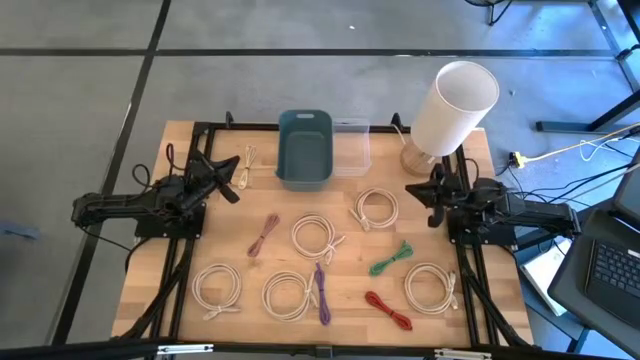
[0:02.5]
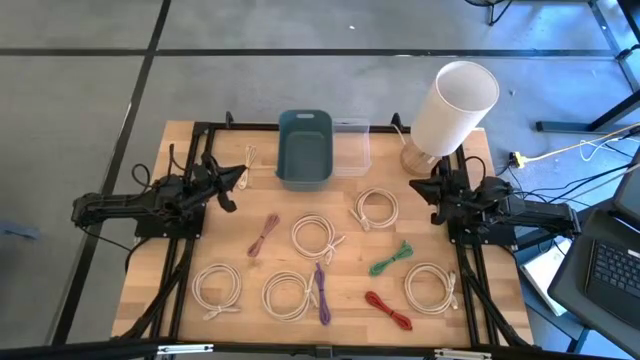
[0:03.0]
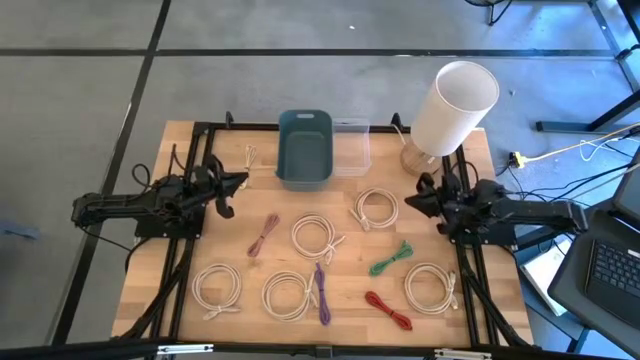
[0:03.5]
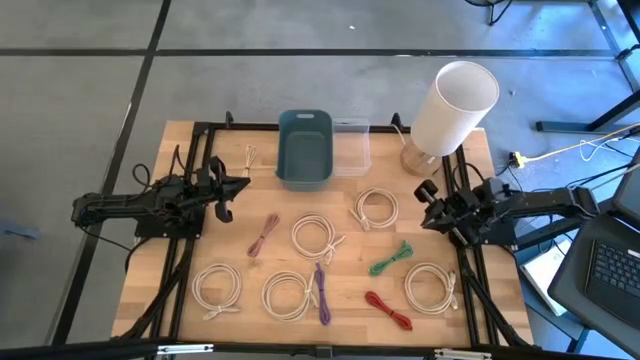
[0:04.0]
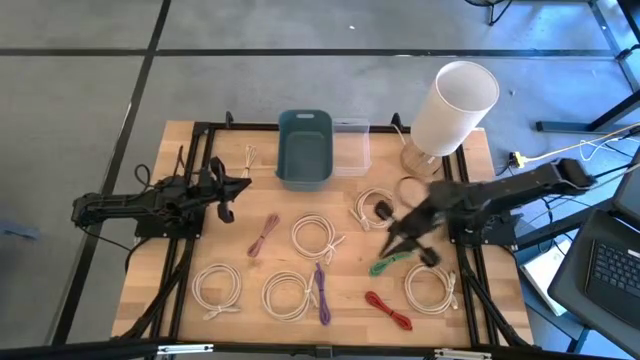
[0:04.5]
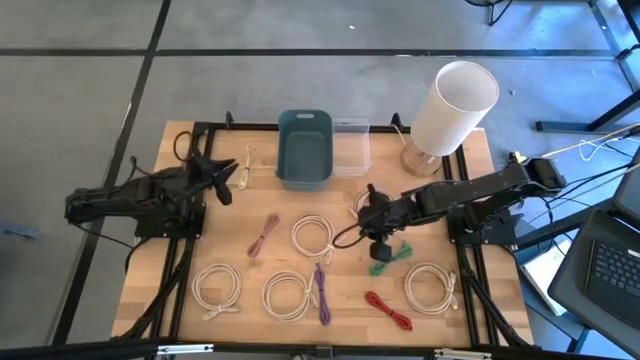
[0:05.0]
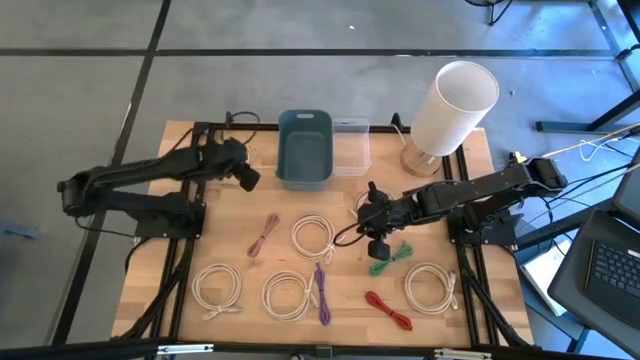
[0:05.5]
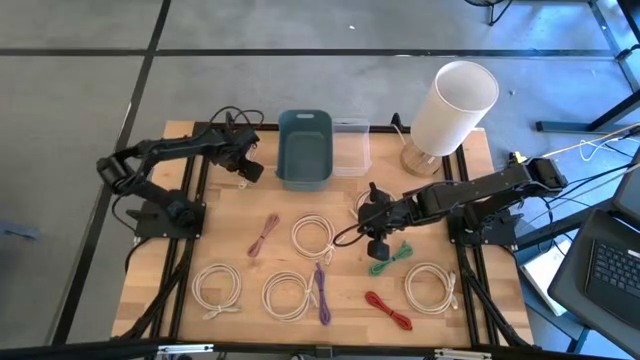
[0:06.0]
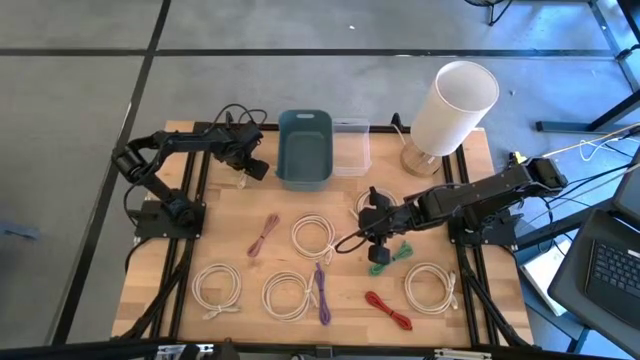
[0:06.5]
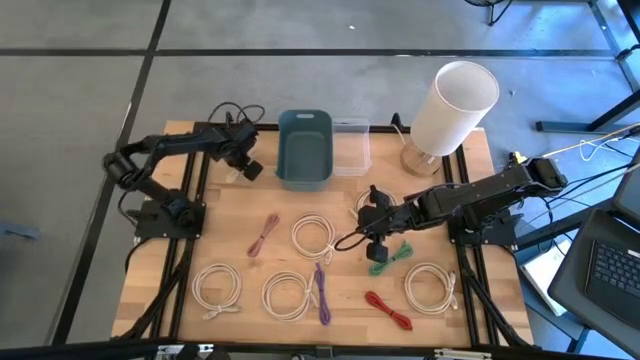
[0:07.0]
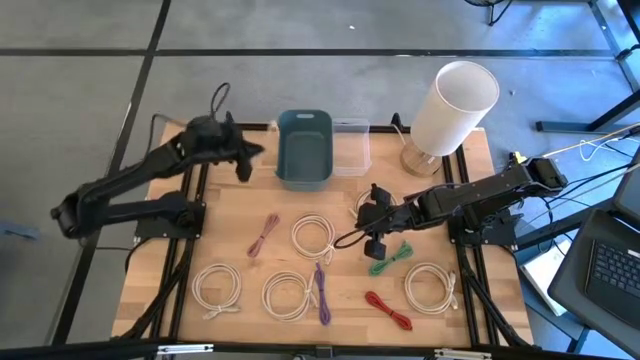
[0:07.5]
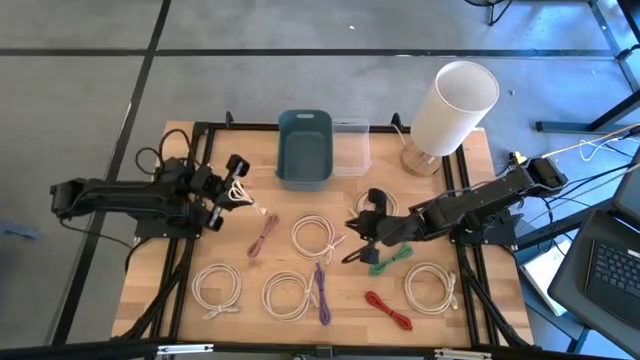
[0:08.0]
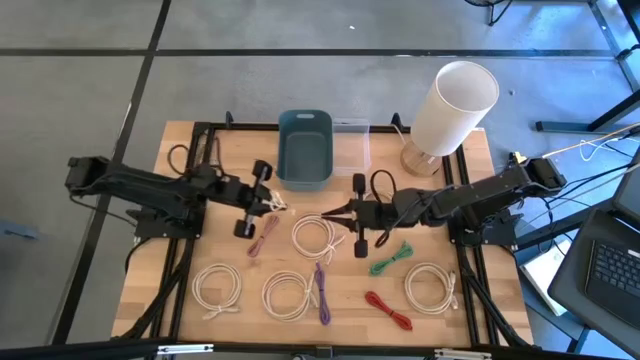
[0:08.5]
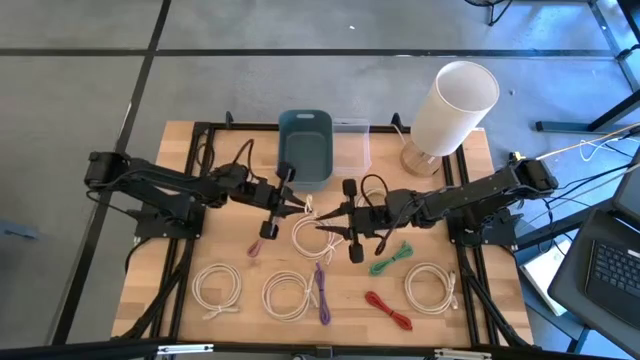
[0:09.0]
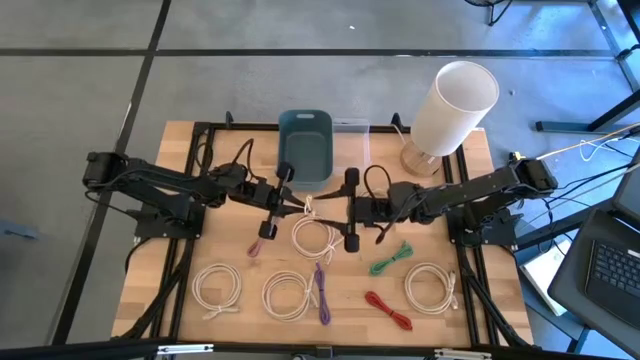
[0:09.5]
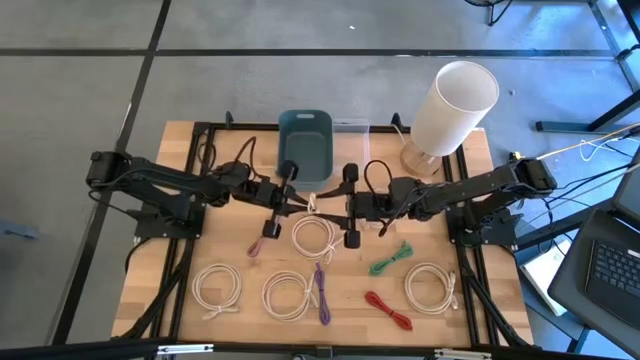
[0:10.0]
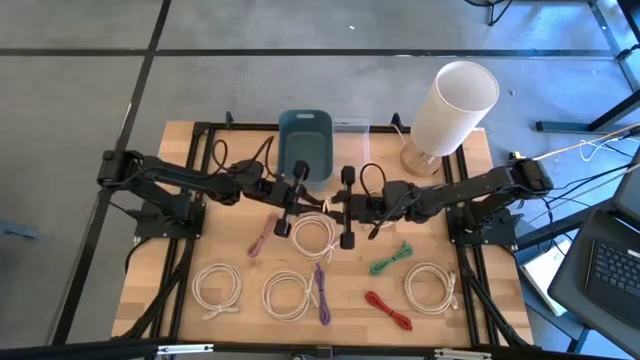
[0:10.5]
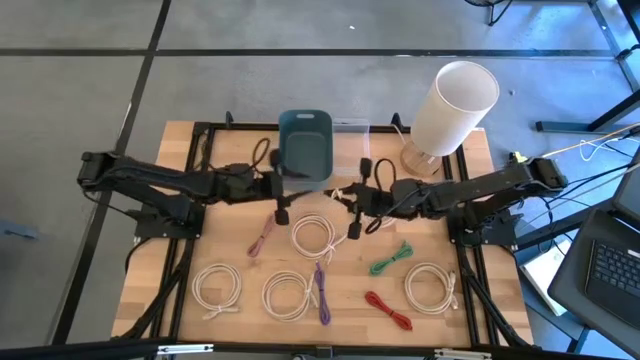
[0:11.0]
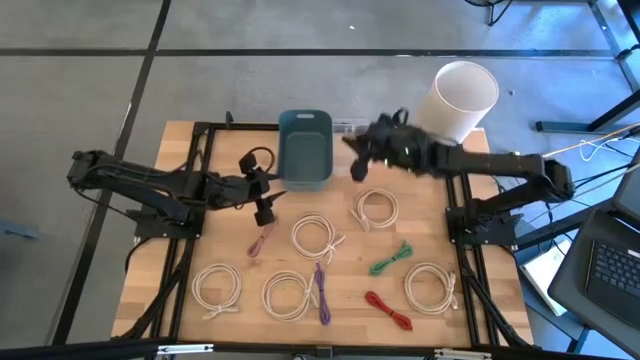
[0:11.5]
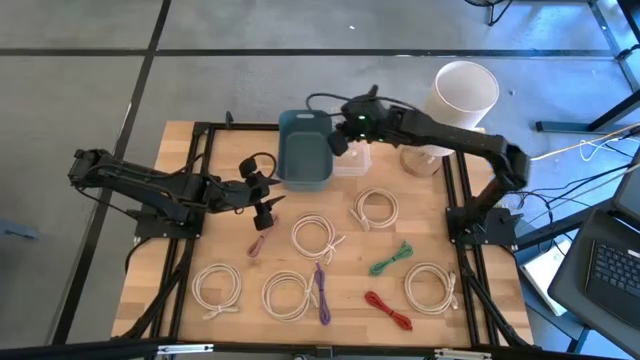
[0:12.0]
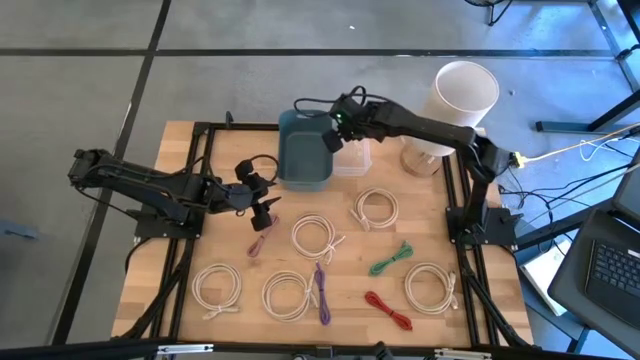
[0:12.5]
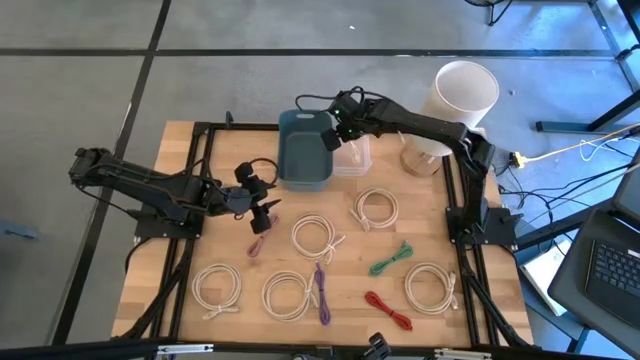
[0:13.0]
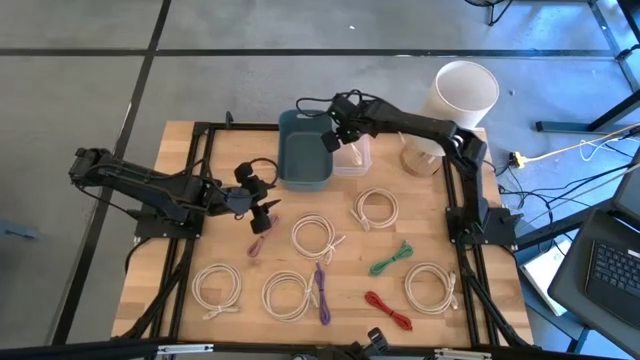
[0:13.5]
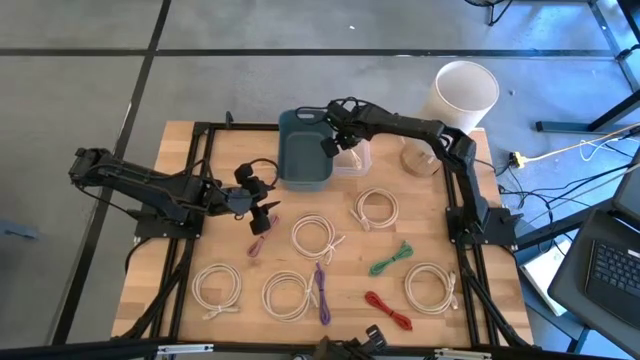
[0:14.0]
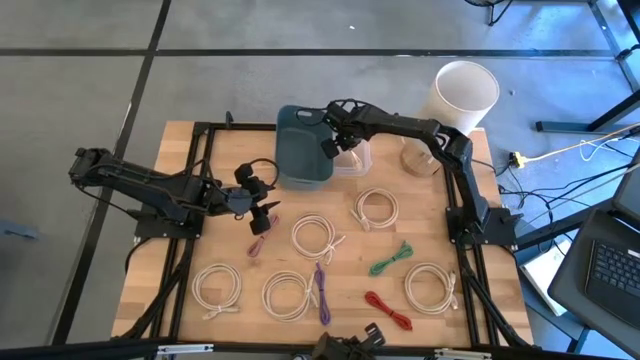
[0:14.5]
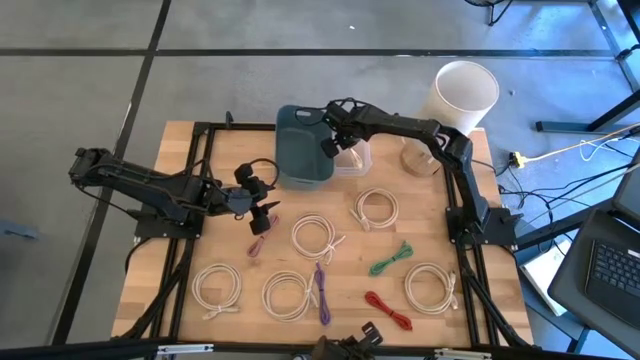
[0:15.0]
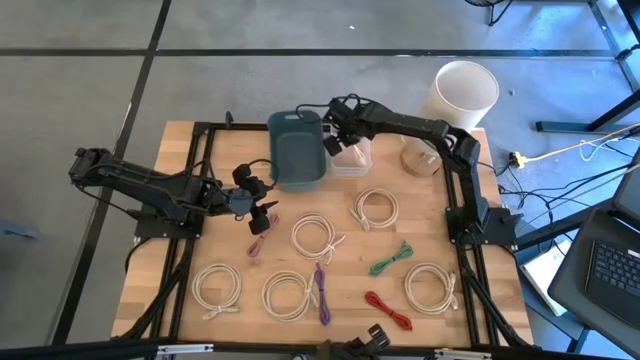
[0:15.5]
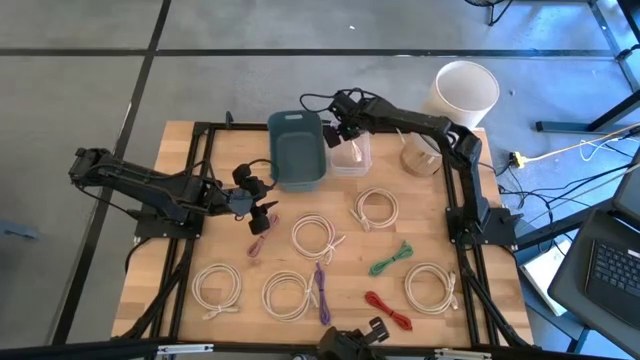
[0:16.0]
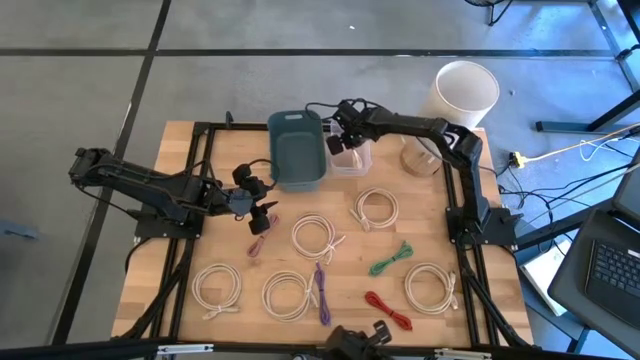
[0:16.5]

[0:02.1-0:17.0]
Put the white charger cable into the transparent bin

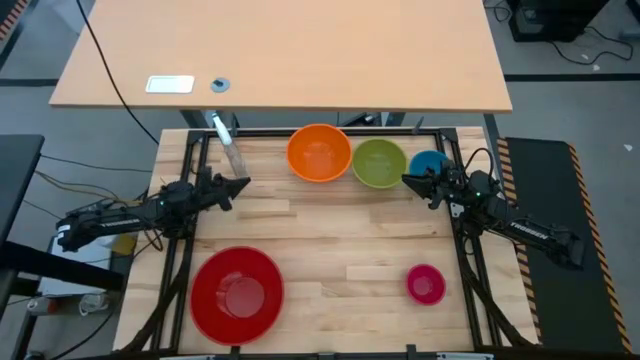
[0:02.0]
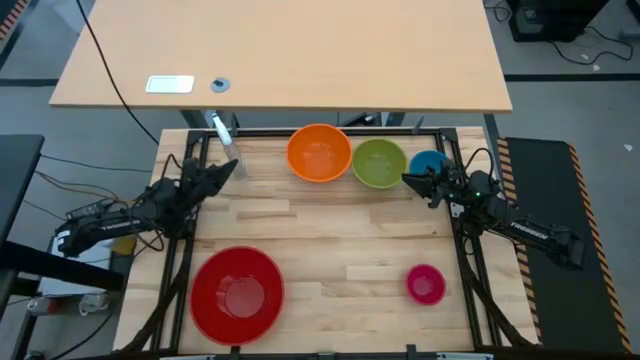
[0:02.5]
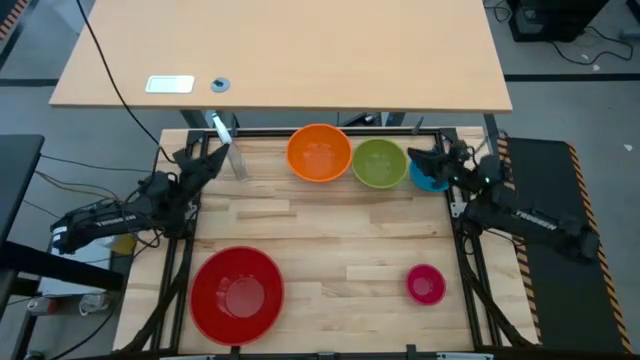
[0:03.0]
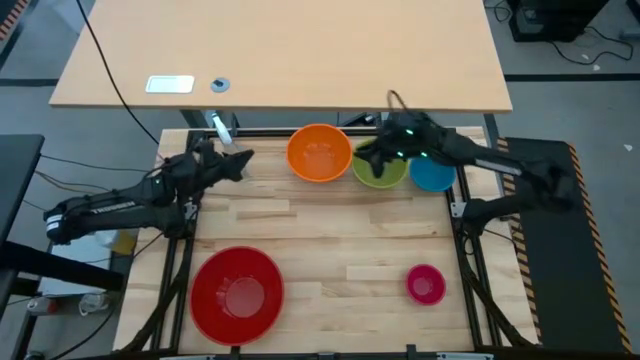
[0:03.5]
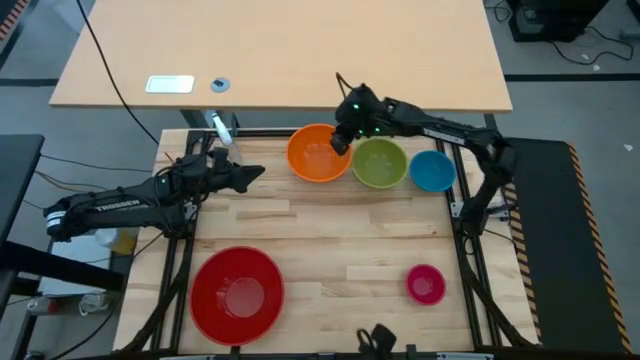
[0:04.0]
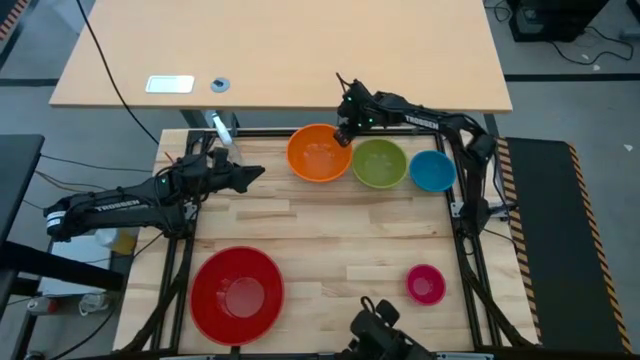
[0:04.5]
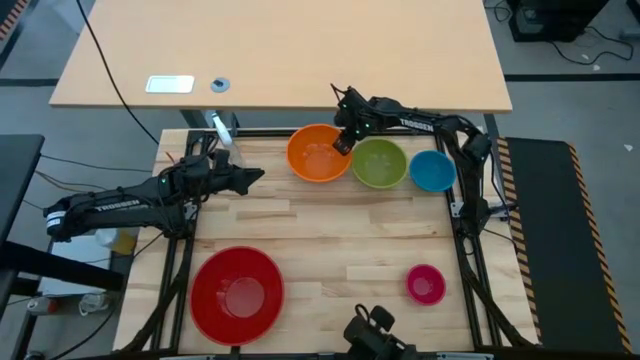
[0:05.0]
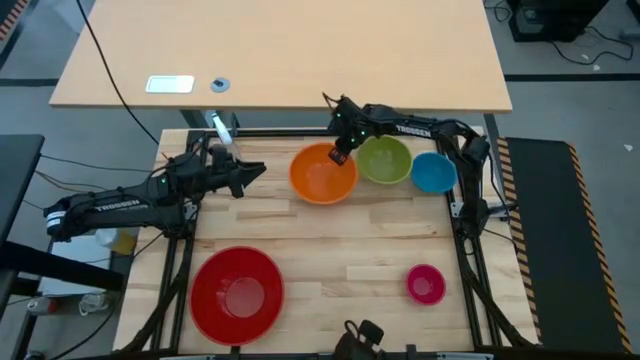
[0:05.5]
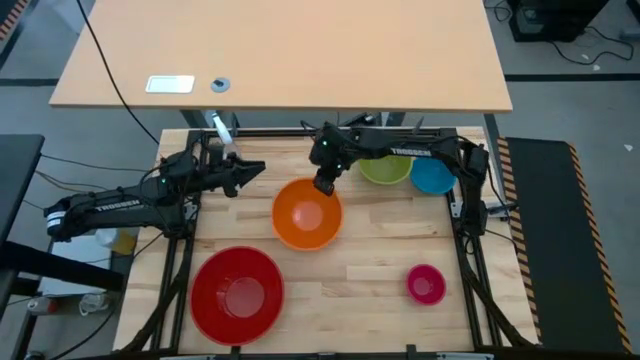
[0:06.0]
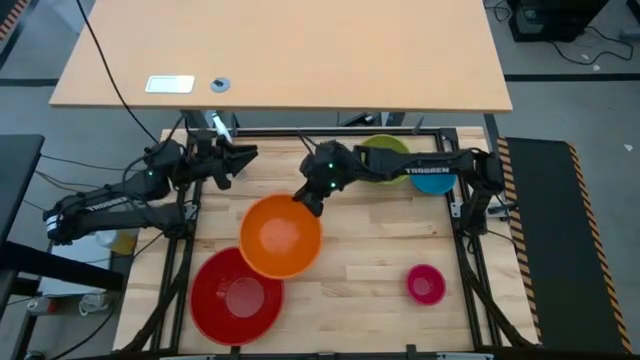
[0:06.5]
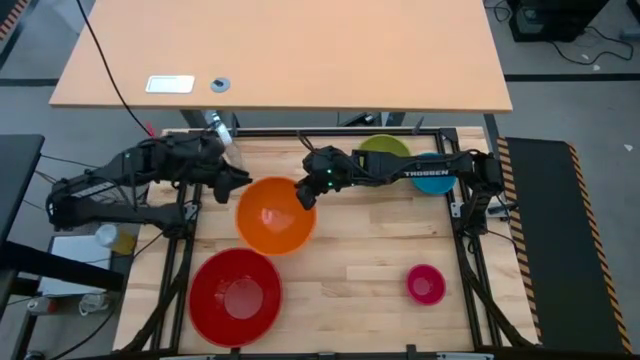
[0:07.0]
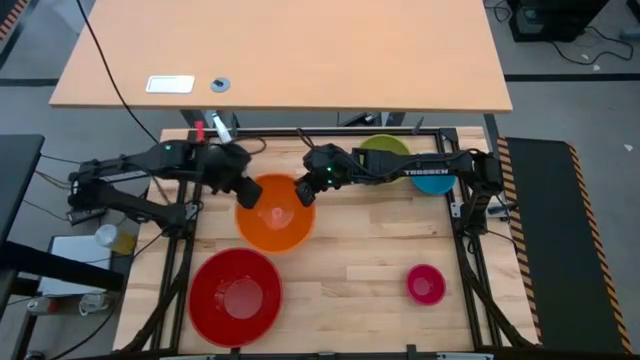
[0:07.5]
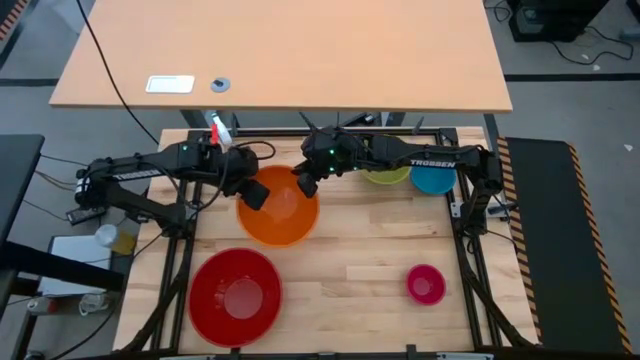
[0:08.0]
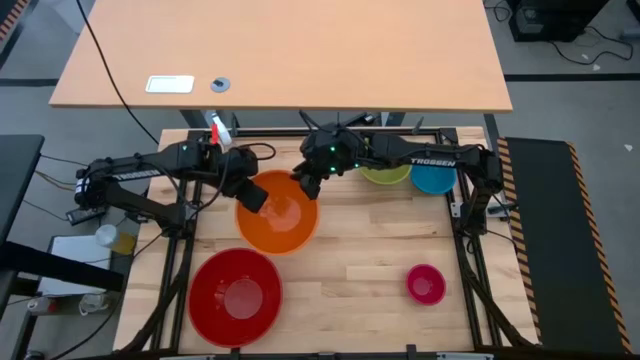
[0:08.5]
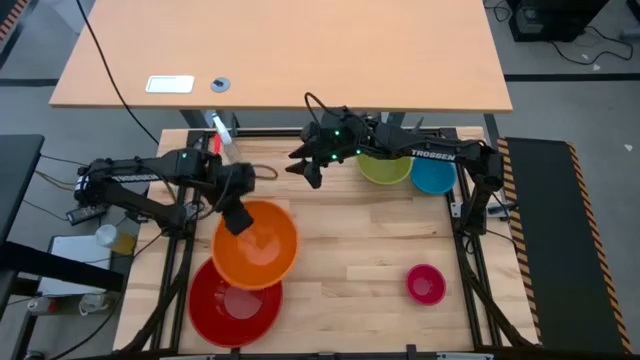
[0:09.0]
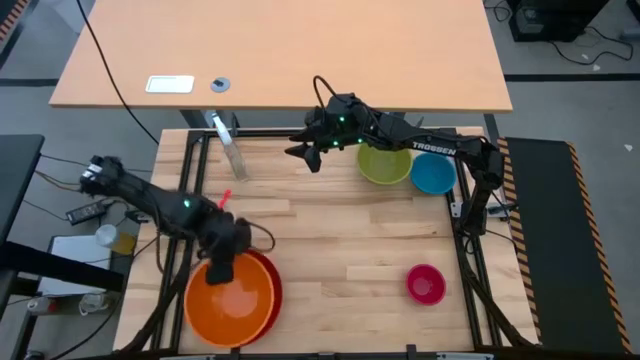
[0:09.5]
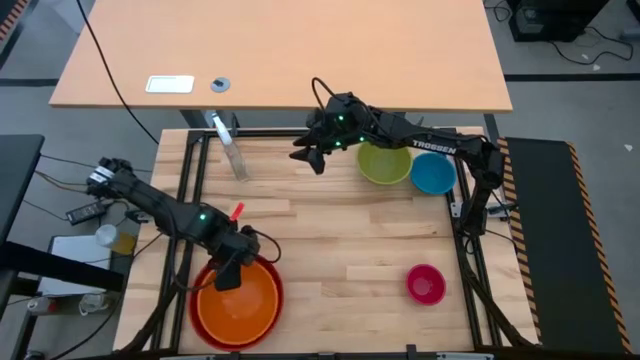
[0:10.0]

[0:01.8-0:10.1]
Stack the orange bowl into the red bowl
